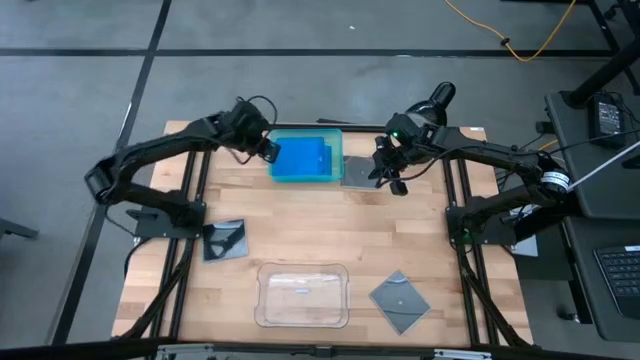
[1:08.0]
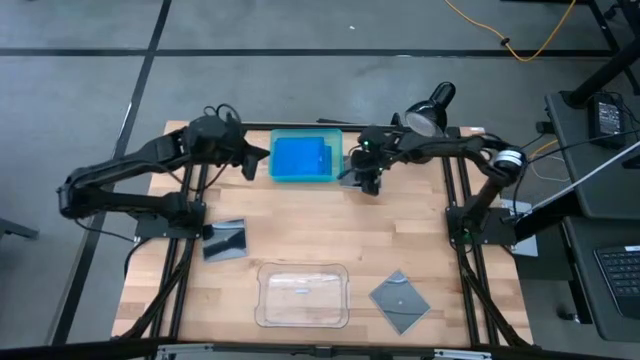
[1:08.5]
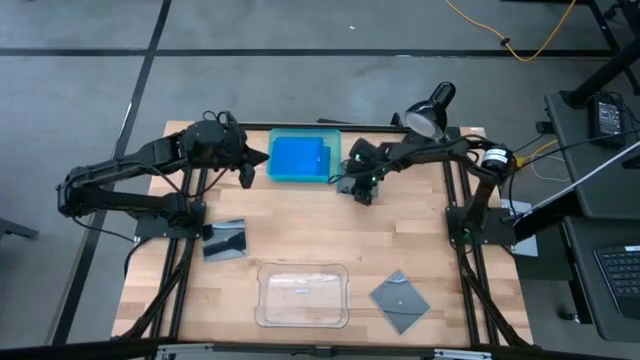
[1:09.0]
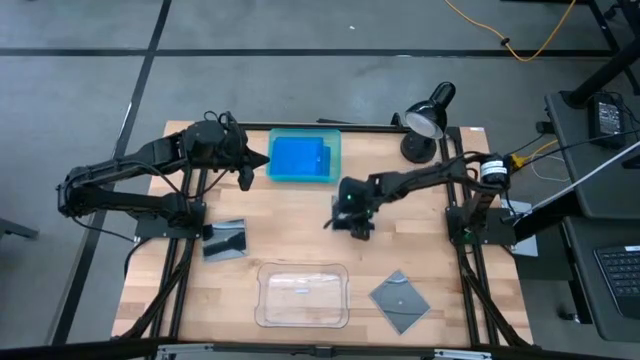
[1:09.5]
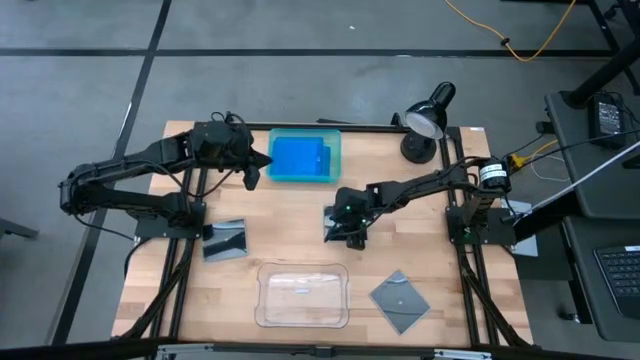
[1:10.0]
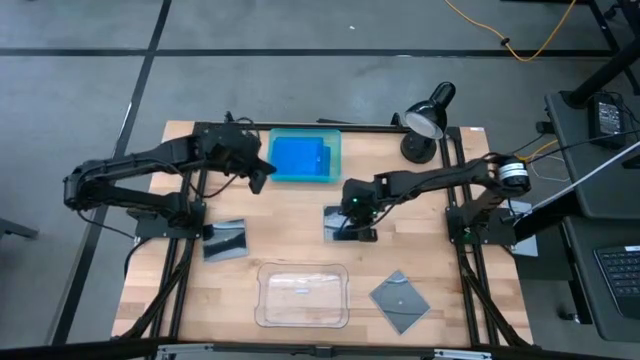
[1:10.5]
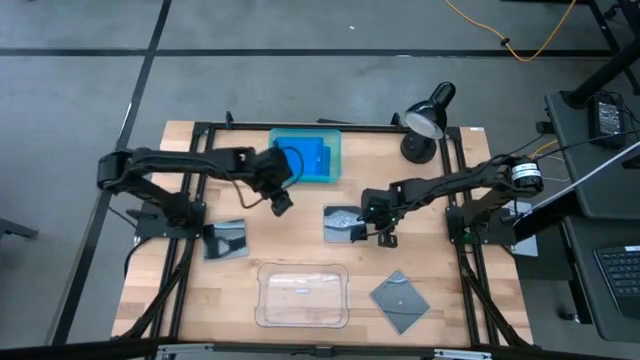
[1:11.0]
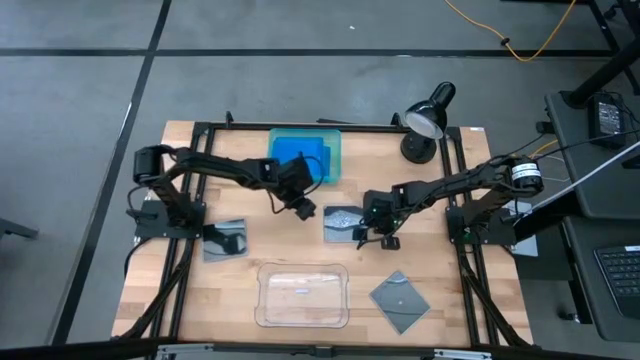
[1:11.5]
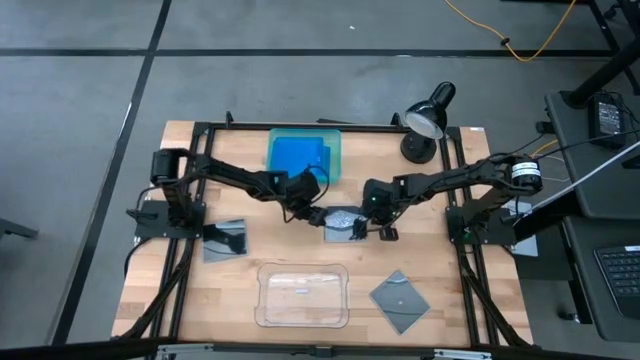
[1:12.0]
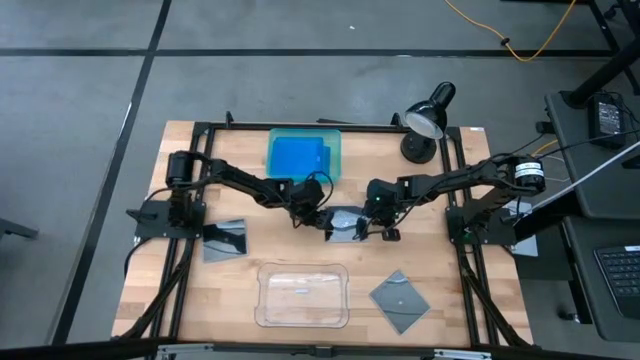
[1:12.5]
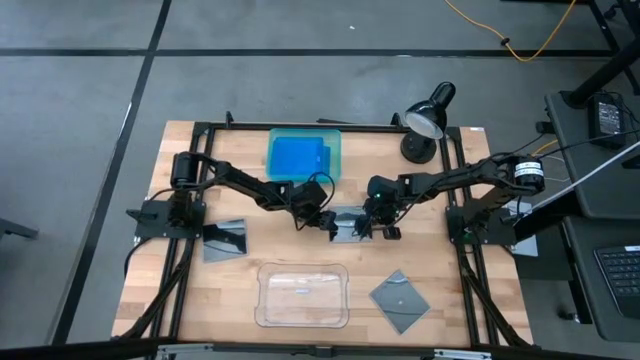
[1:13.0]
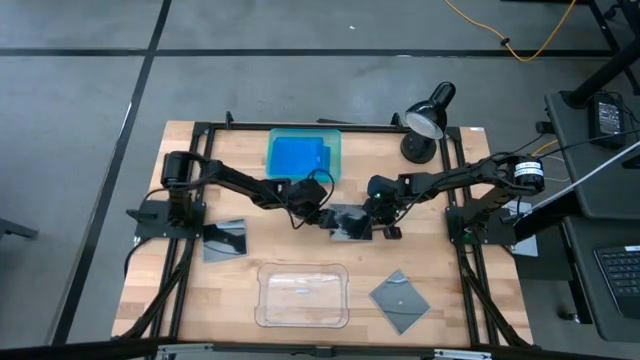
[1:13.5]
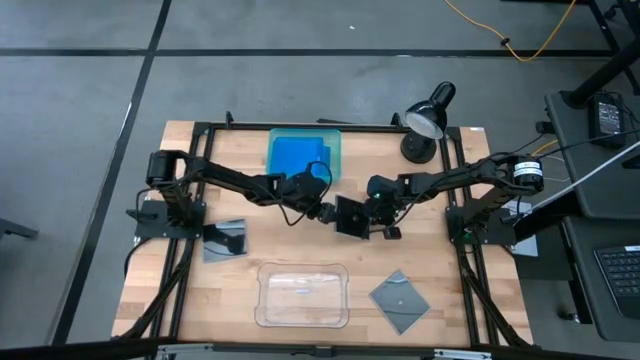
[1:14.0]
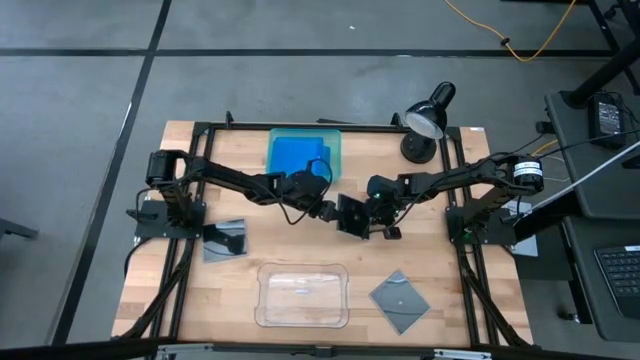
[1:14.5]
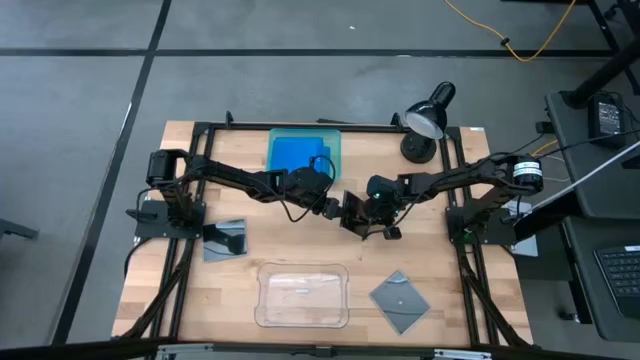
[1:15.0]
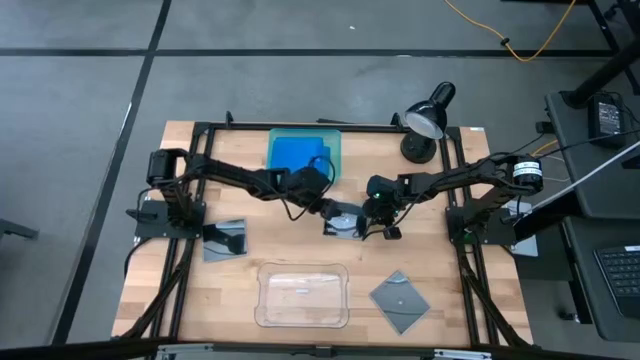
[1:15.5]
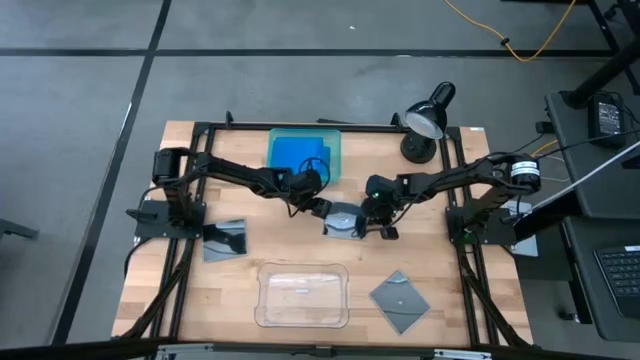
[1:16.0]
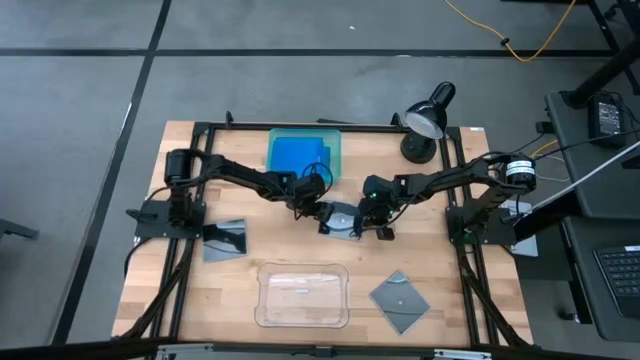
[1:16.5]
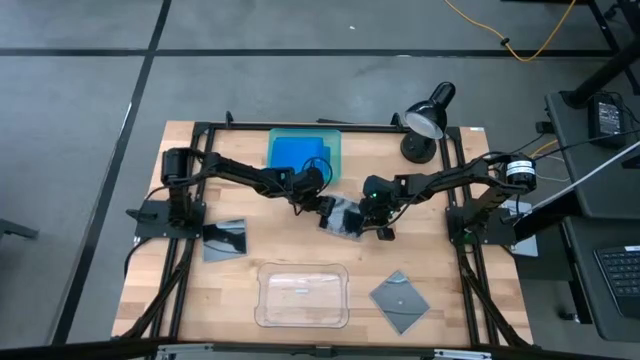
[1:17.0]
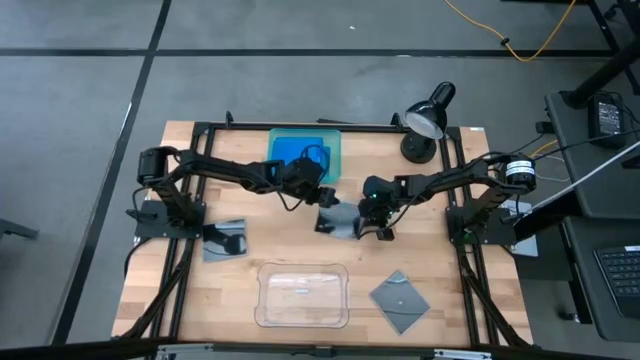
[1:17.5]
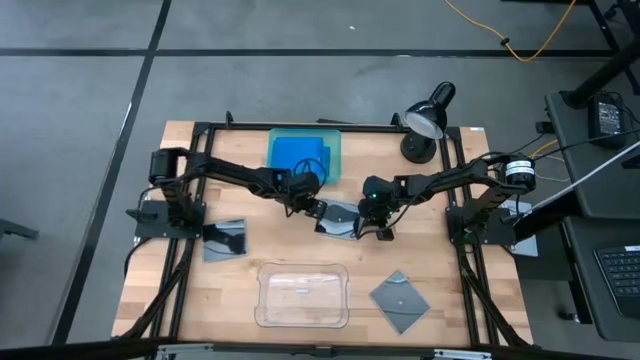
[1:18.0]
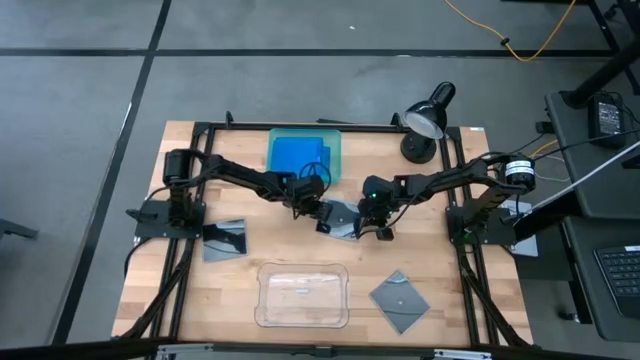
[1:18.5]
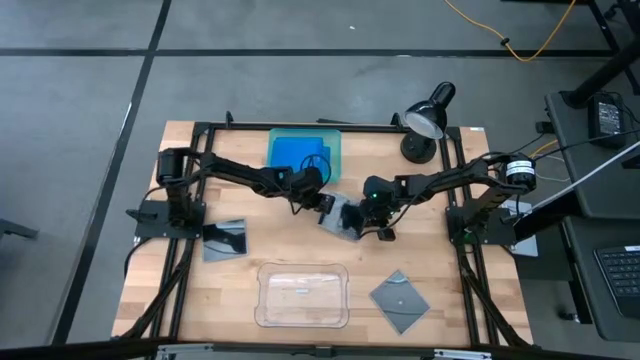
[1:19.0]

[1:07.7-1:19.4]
Task: Pick & place jewel cases by type
Put the top black cd case into the transparent bin

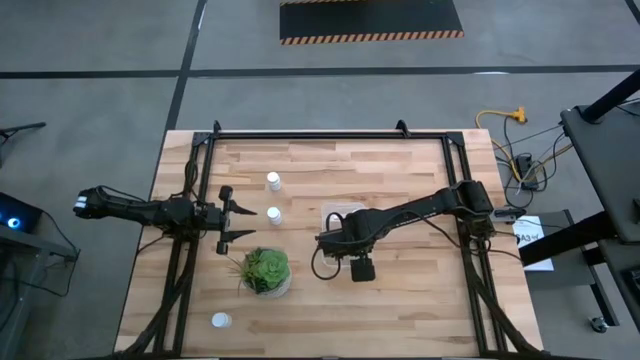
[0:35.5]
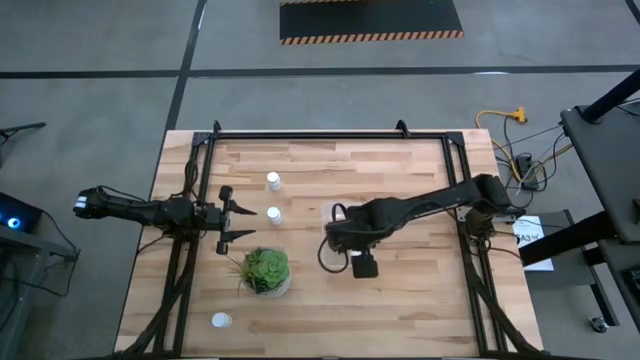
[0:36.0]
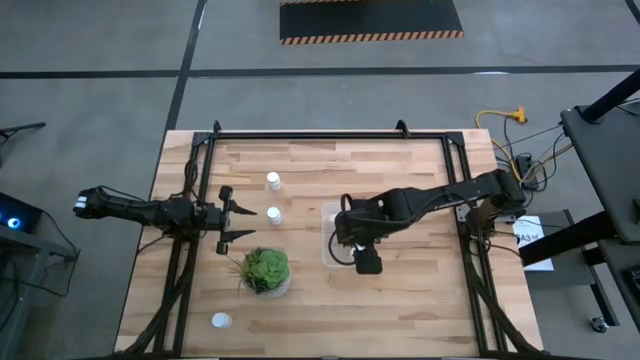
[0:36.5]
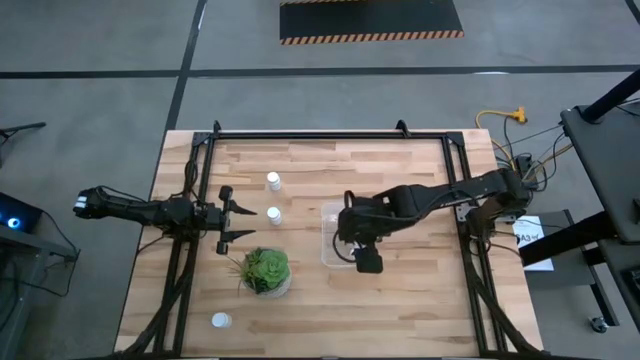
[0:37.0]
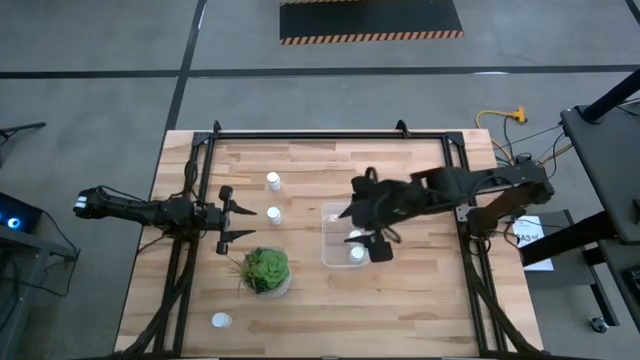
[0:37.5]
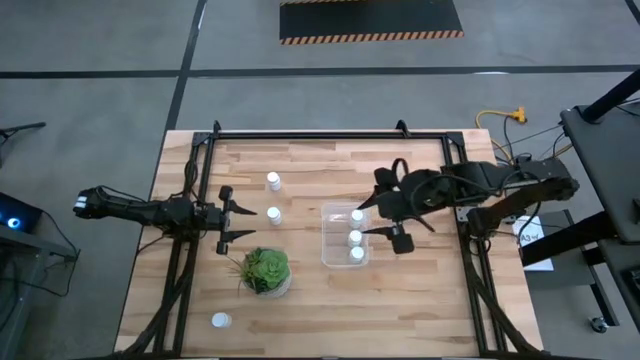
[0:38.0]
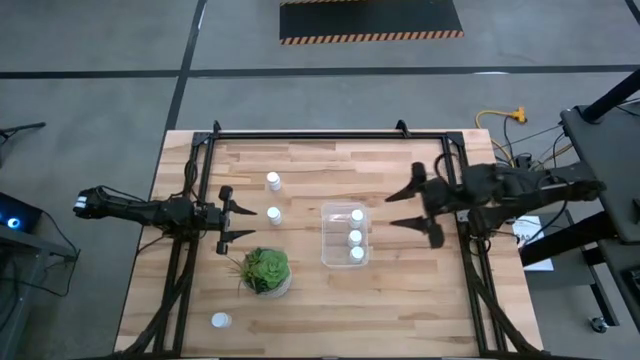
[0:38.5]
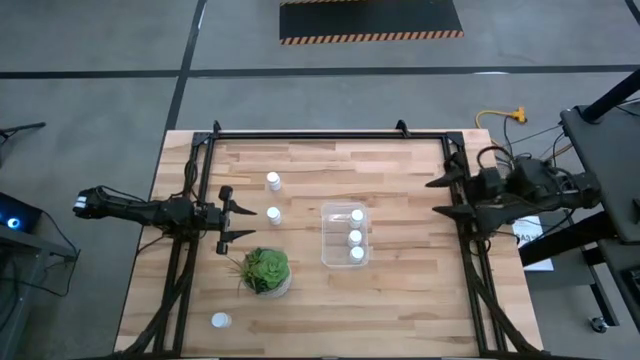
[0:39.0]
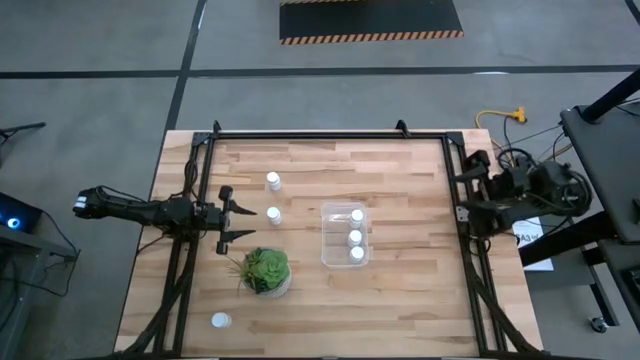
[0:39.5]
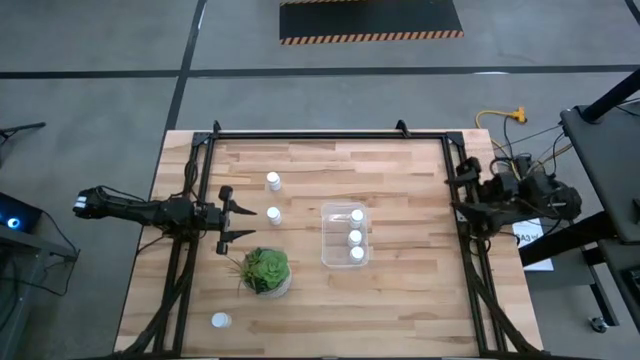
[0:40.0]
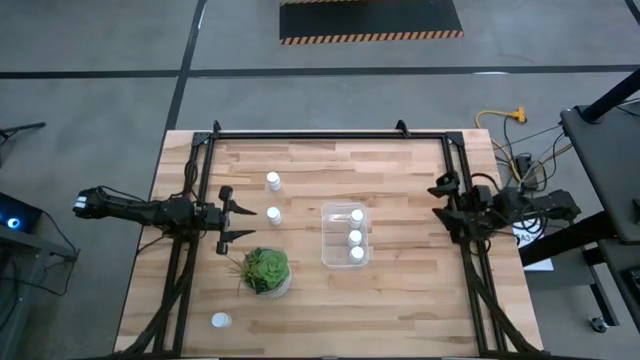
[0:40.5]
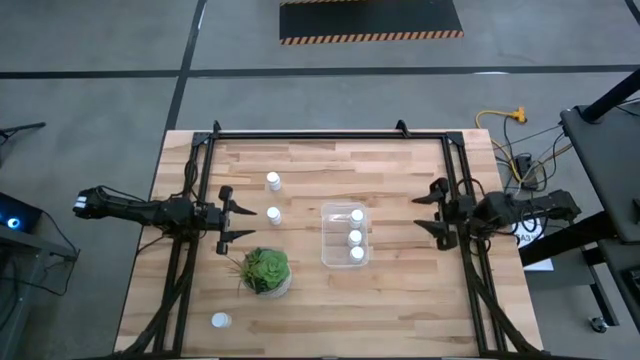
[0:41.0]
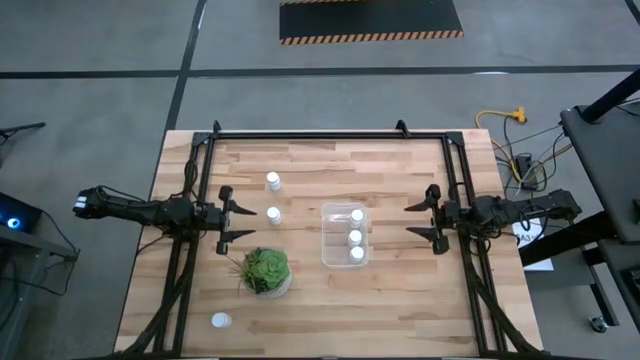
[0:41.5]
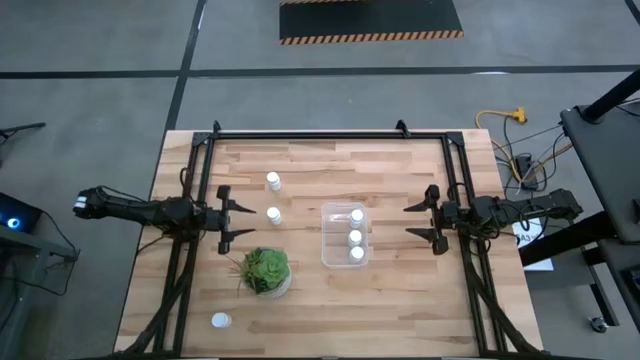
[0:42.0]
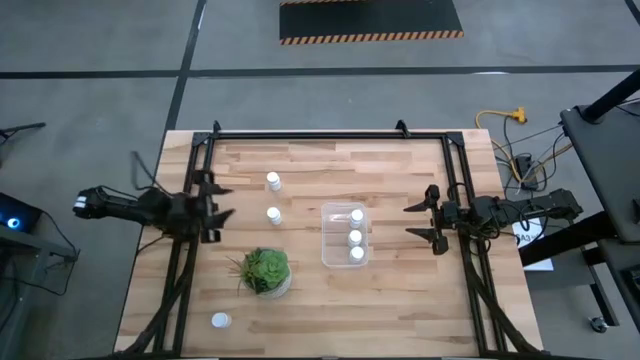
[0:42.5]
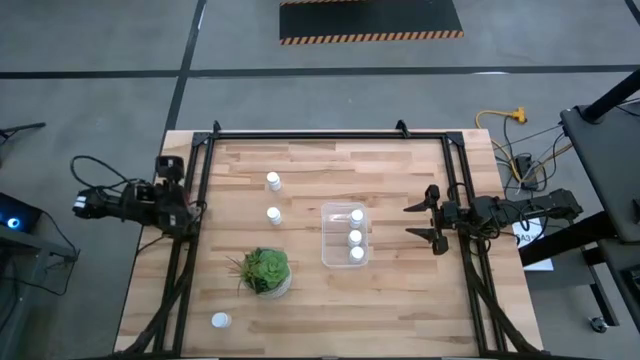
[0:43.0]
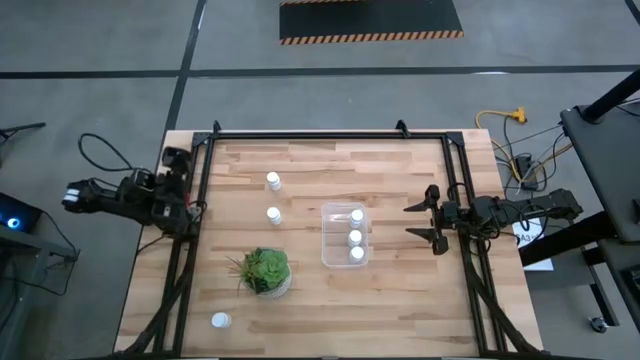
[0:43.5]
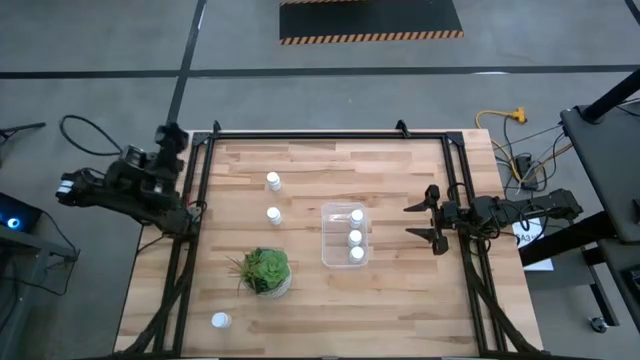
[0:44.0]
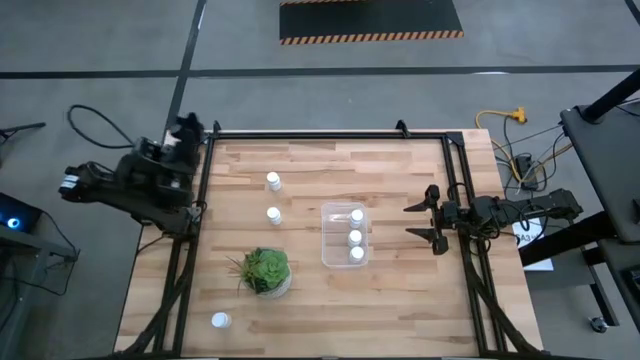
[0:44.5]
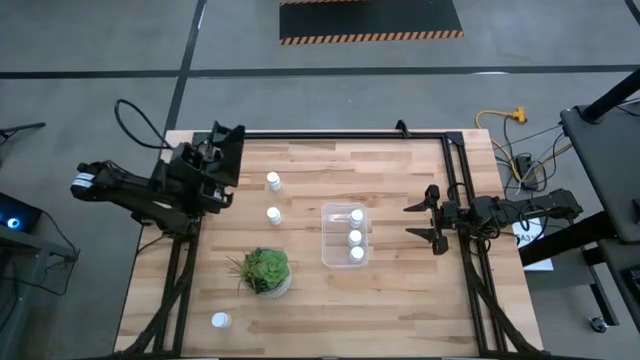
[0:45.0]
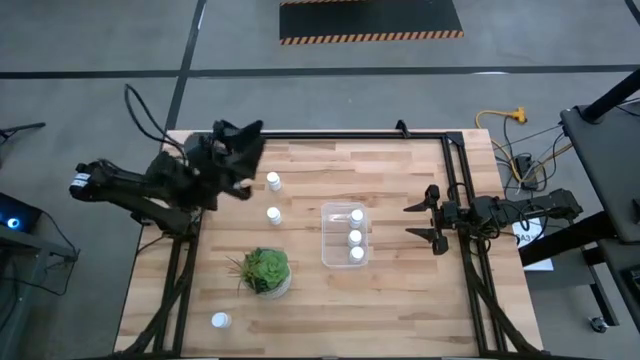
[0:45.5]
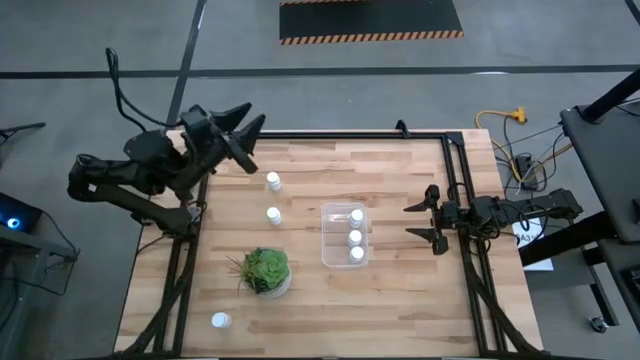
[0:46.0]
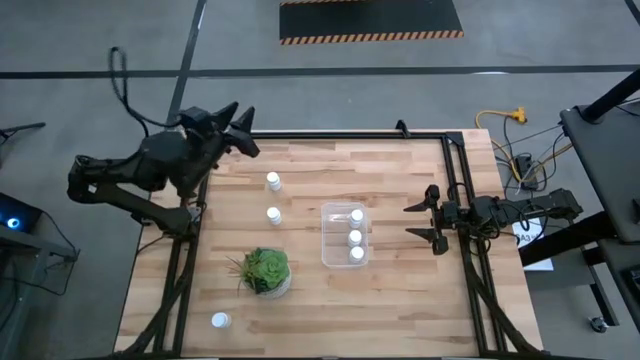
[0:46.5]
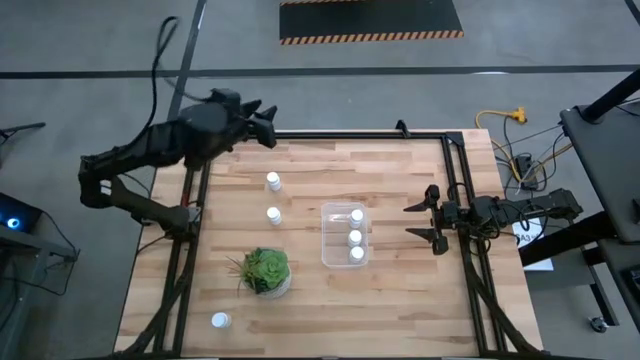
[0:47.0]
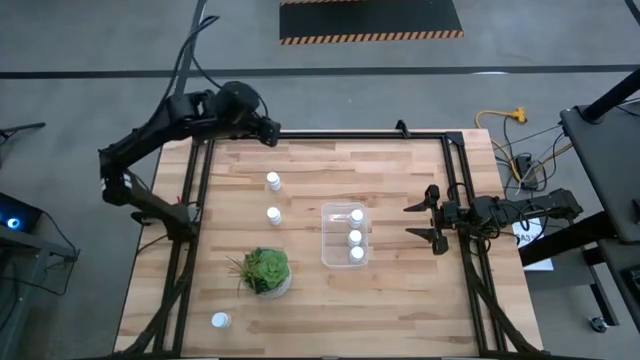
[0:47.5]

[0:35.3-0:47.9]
Task: Pick and place pill bottles into a basket
Put the white medicine bottle into the transparent bin
